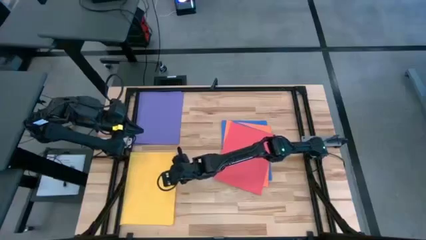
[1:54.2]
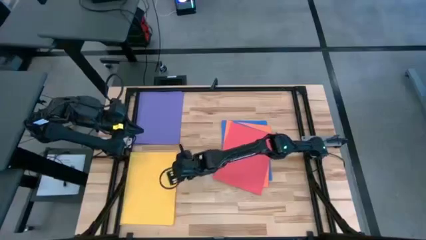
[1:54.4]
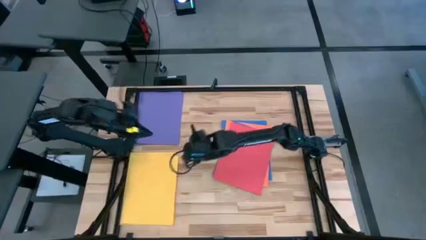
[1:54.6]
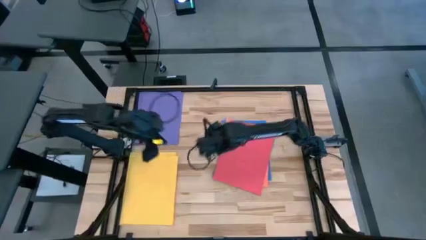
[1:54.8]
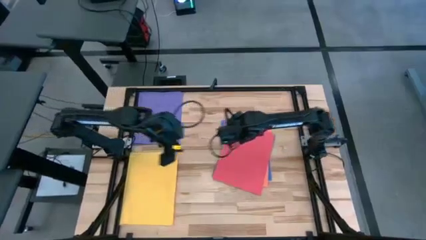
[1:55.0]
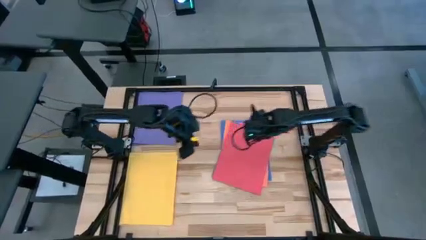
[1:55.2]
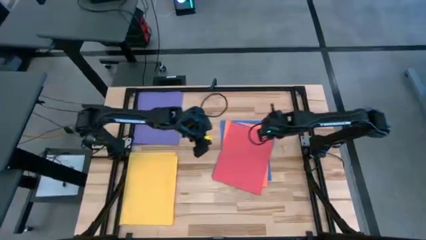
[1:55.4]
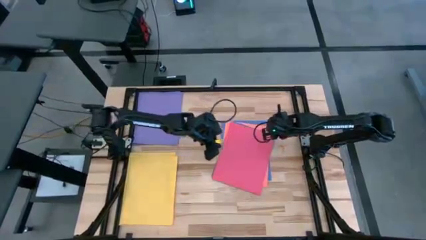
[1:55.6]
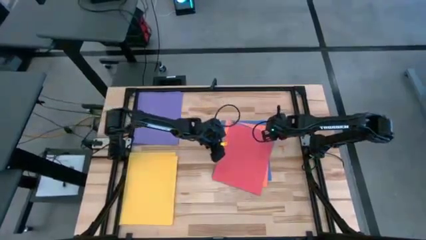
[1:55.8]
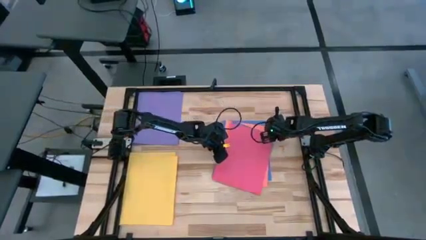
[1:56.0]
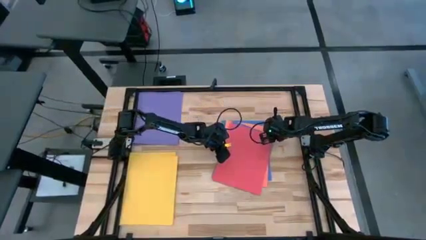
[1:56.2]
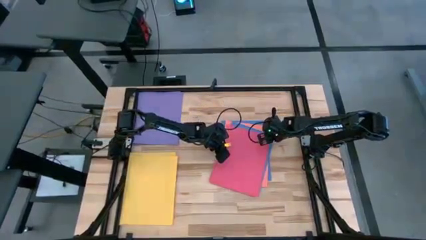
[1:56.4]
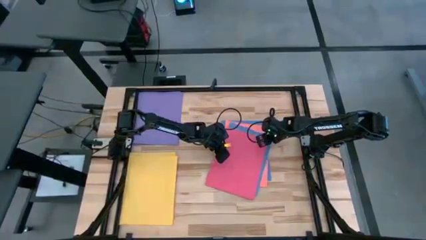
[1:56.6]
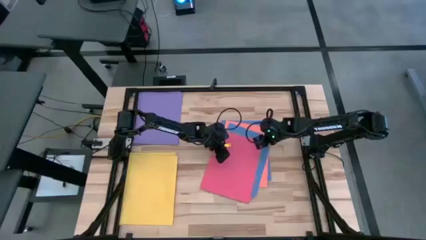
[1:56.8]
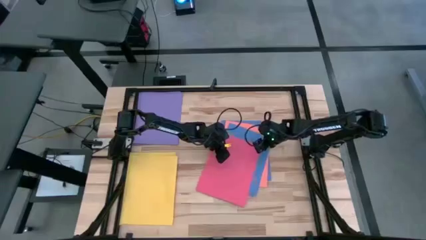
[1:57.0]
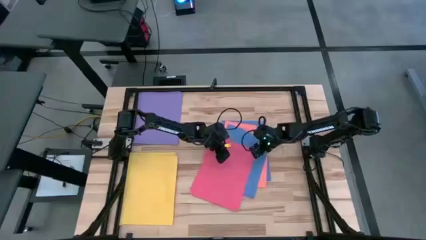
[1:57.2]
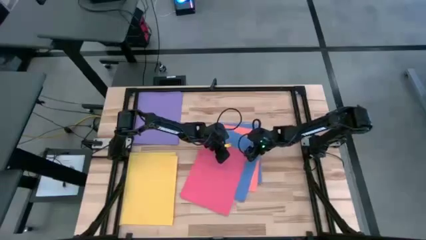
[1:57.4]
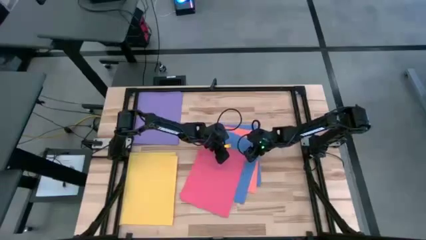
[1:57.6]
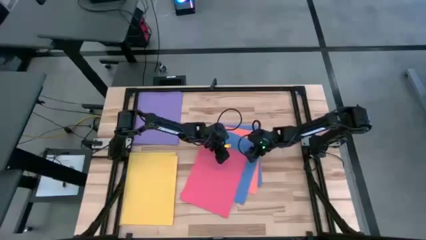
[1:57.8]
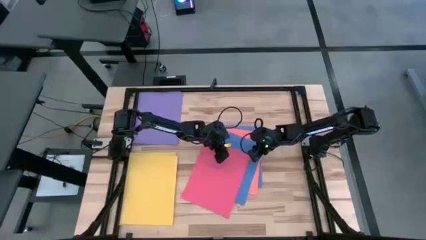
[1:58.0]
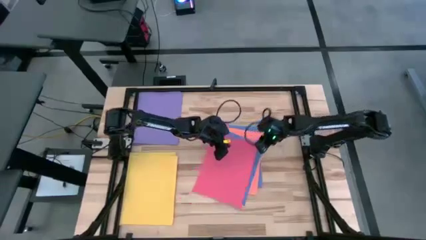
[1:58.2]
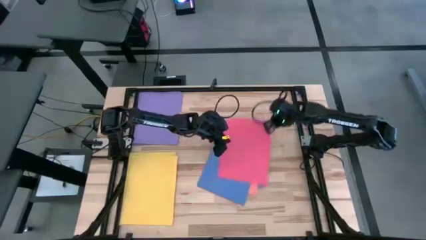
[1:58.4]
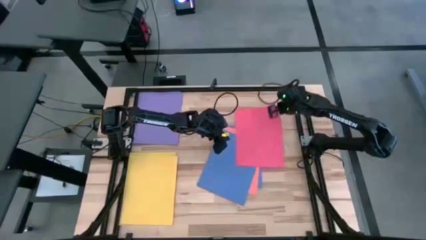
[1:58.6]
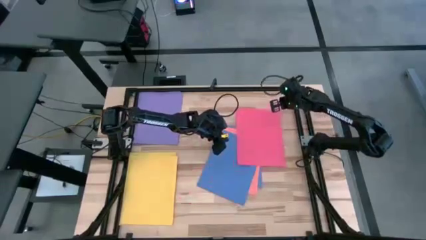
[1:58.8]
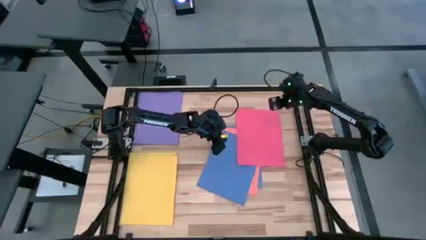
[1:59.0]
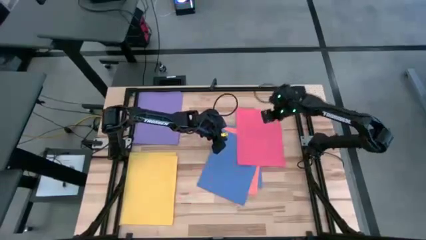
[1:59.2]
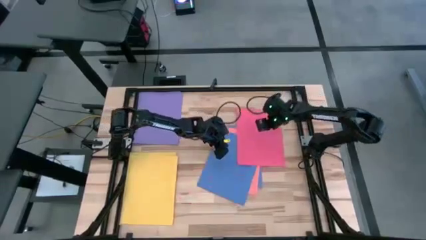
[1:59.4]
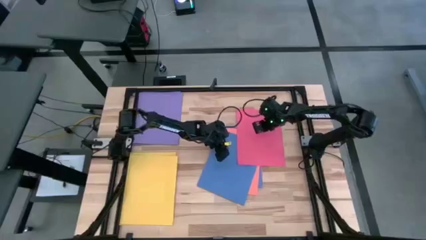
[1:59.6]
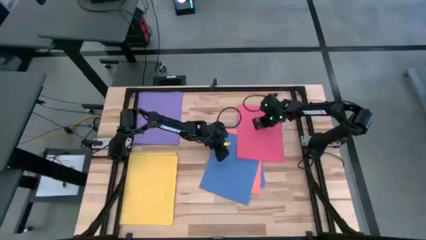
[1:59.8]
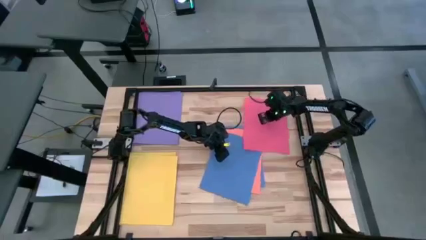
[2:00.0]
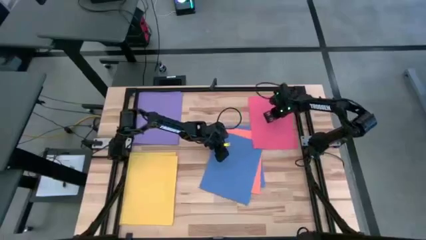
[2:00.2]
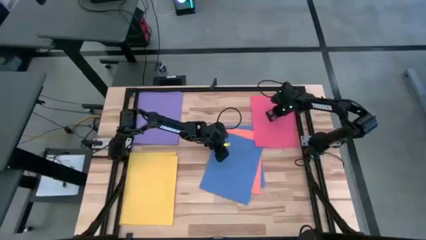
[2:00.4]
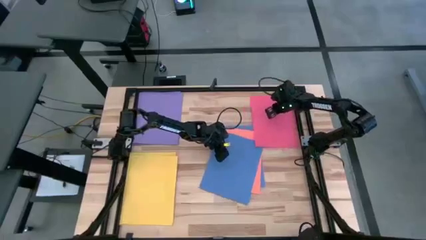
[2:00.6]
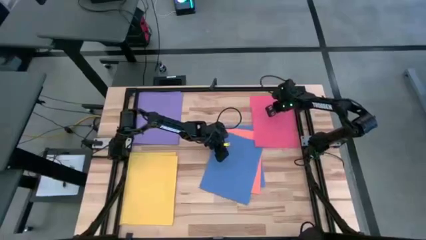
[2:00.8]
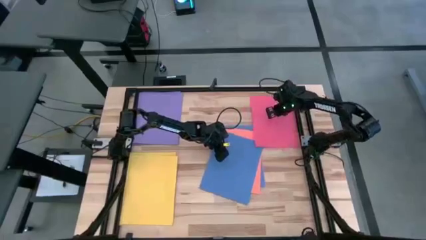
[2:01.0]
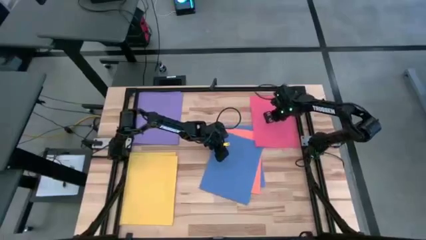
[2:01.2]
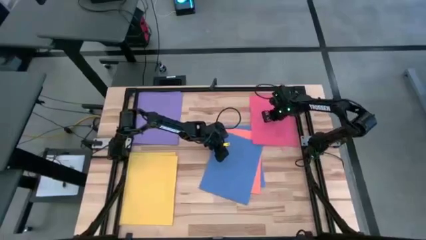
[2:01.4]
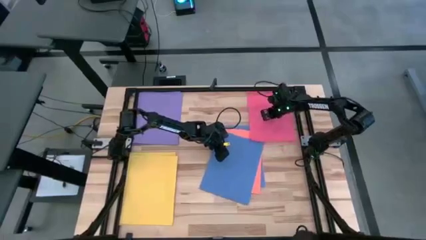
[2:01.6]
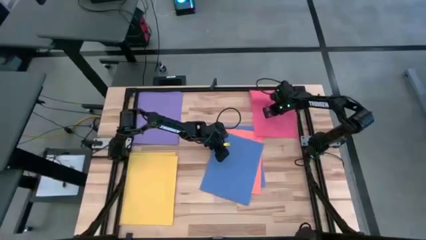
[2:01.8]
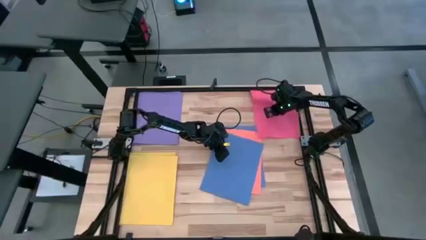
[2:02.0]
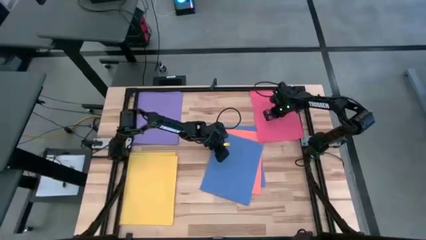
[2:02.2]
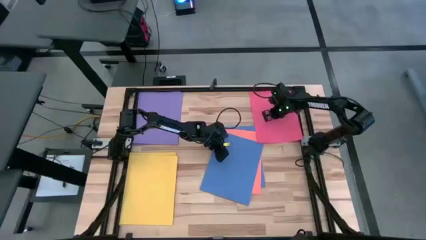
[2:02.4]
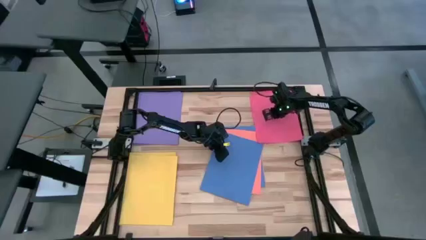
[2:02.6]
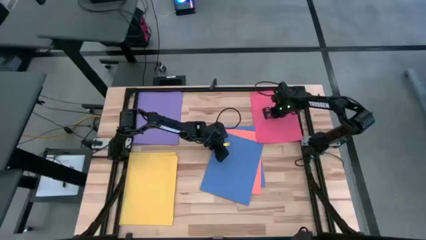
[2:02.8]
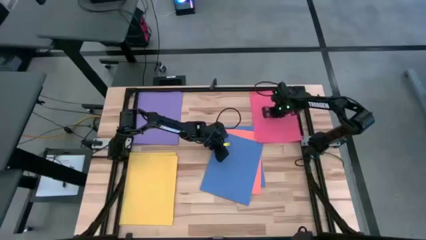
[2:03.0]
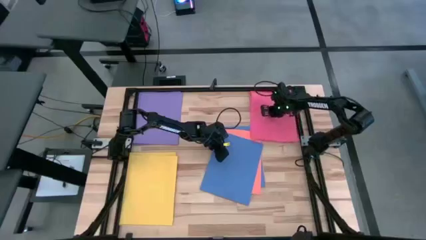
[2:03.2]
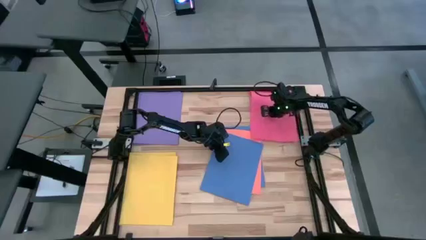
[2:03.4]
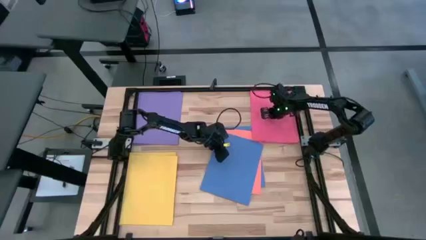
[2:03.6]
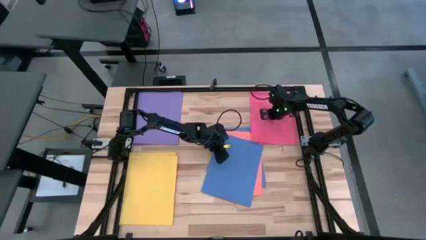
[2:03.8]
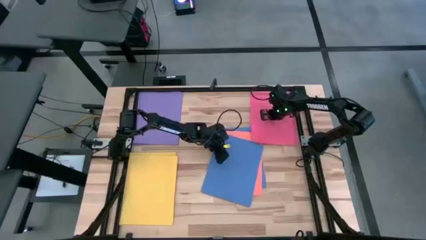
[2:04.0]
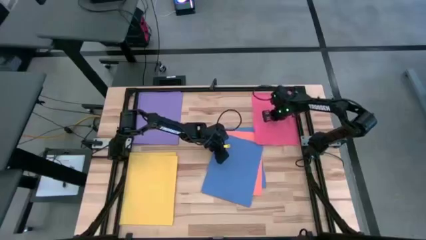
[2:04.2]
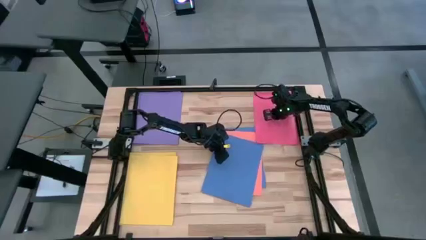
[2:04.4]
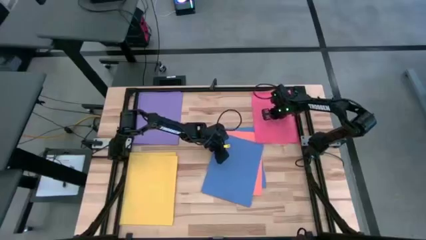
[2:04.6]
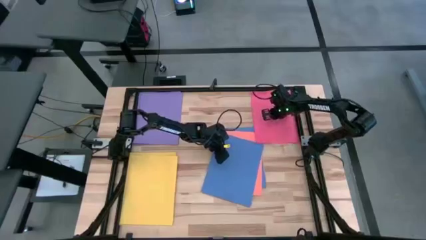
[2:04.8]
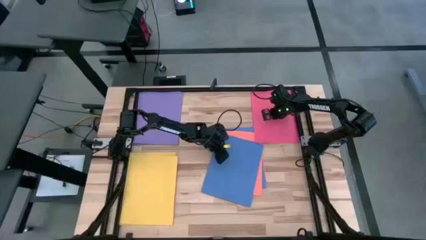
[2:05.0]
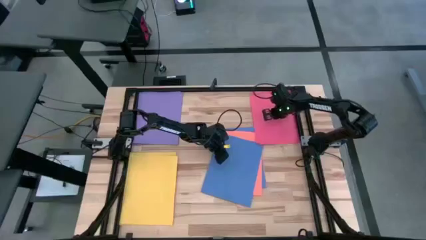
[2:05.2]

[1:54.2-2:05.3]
Task: Organize paper
Move the pink paper to the top right of the table

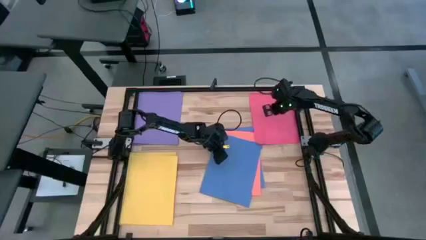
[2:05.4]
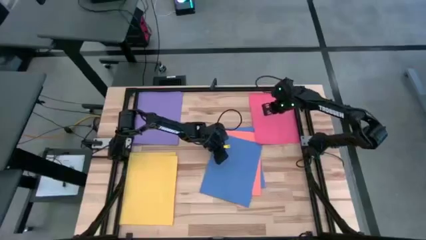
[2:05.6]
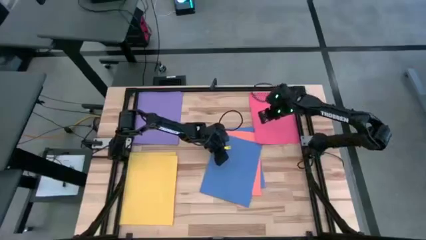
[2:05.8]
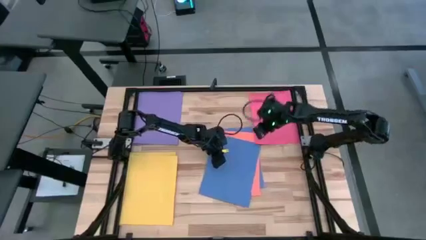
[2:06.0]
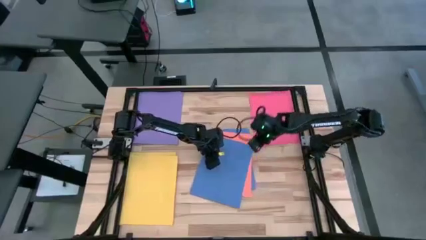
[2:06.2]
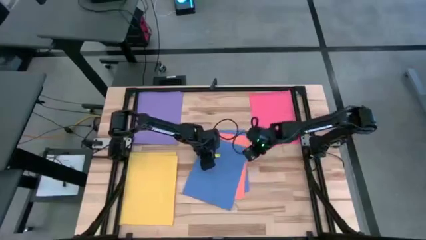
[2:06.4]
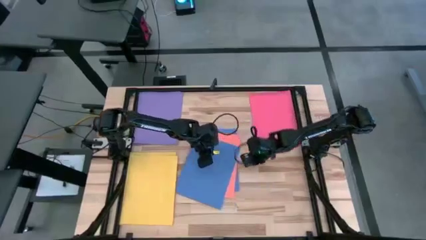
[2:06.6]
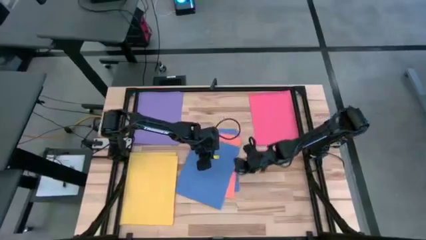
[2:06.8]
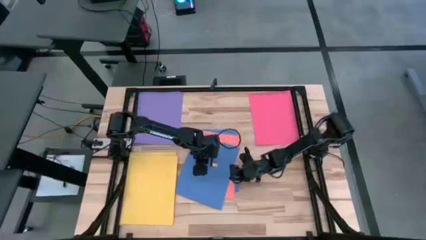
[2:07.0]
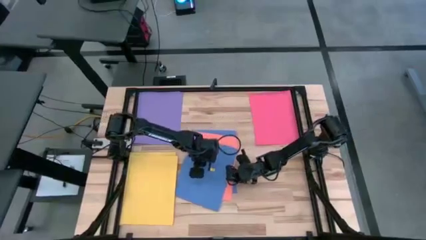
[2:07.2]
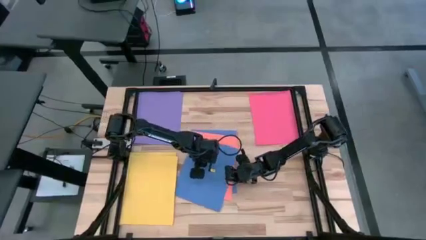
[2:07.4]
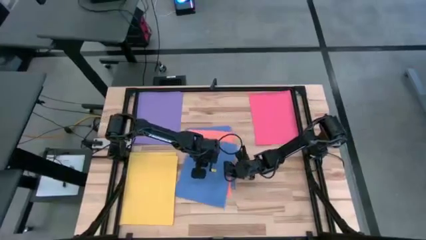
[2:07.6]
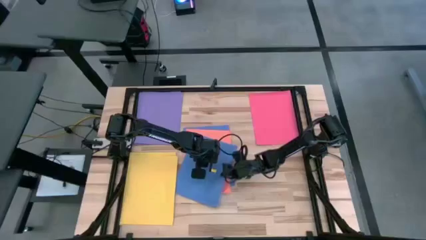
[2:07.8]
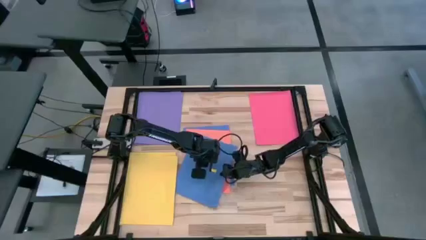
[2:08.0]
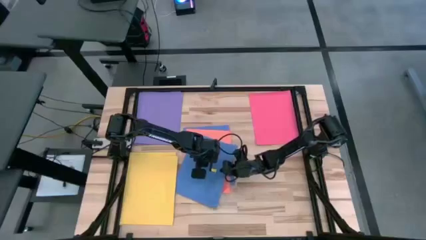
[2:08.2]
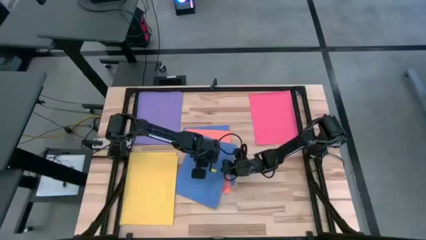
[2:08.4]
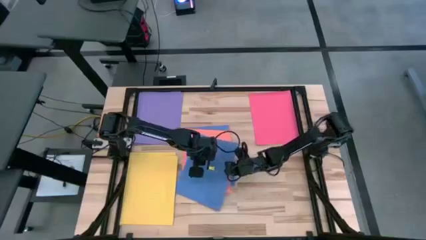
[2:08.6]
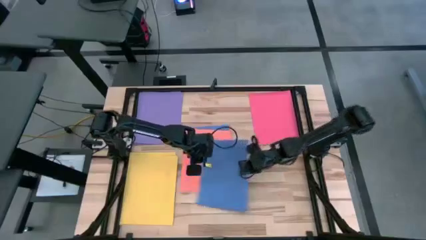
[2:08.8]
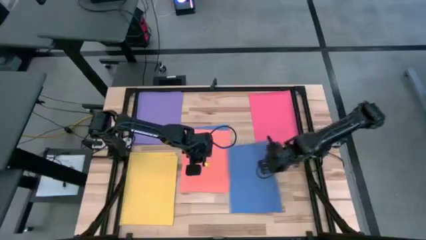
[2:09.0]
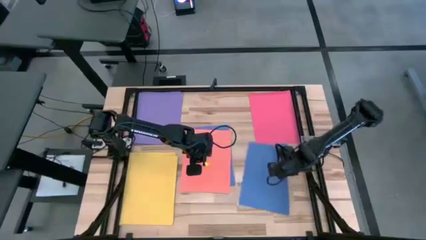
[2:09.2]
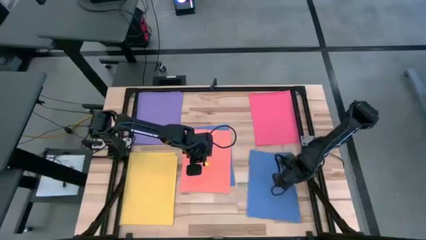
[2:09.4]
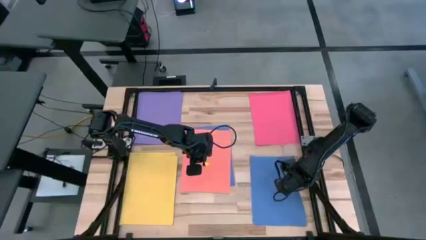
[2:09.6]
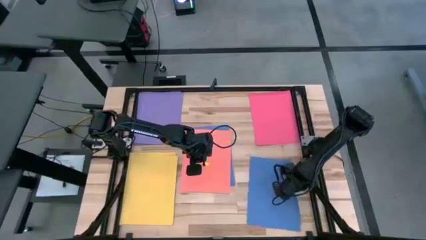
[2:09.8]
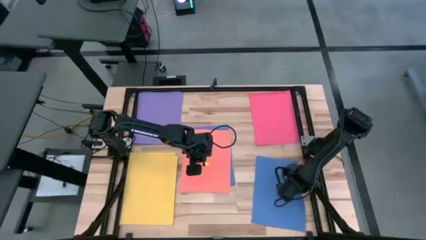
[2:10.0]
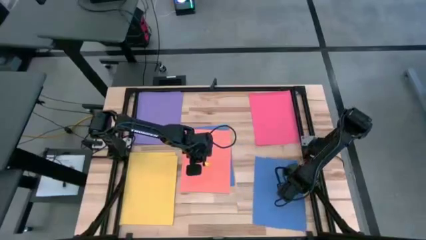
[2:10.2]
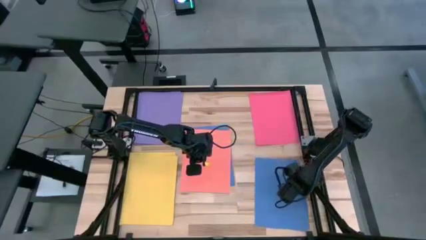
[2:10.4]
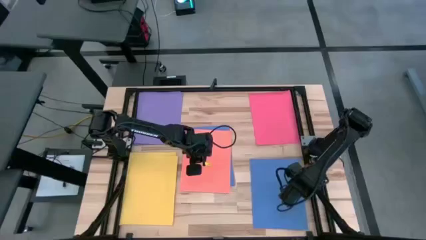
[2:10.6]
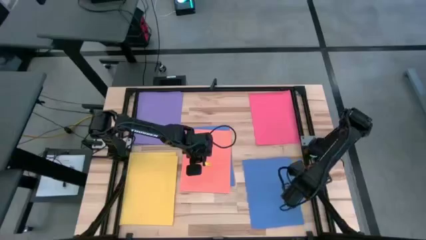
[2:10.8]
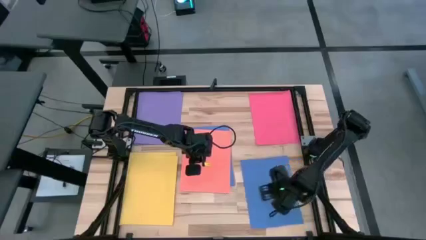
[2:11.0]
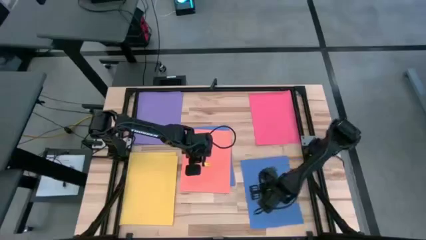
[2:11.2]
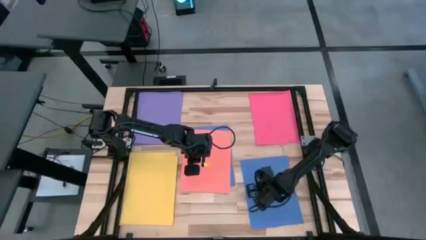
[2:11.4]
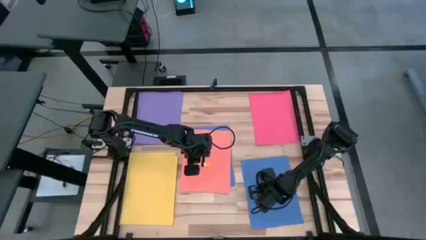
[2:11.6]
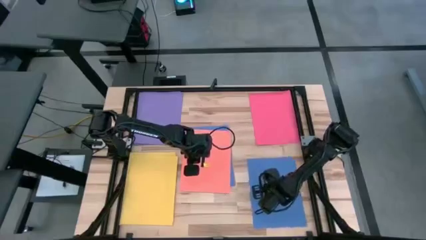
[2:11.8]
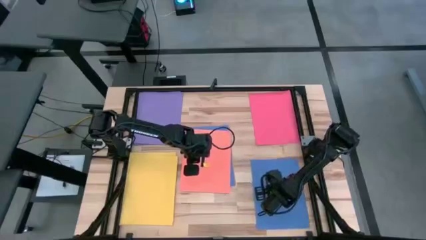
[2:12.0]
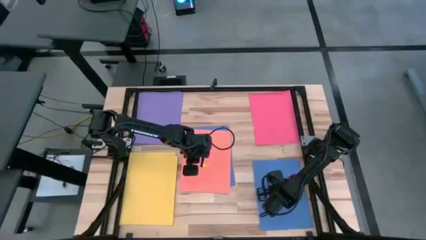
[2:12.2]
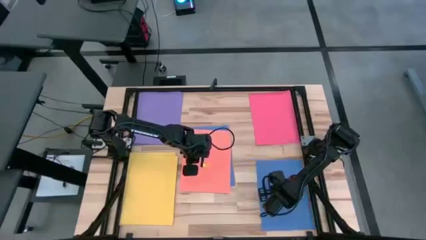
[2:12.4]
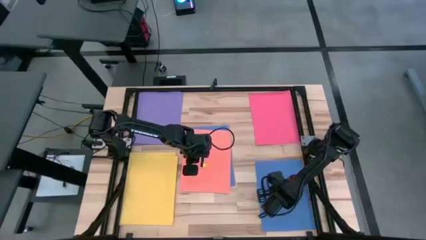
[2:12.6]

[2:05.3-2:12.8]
Move the blue paper to the bottom right of the table
